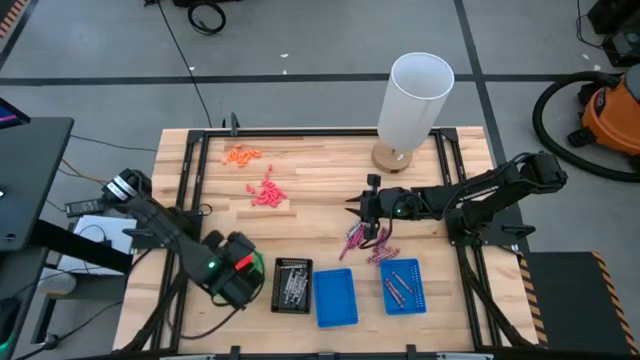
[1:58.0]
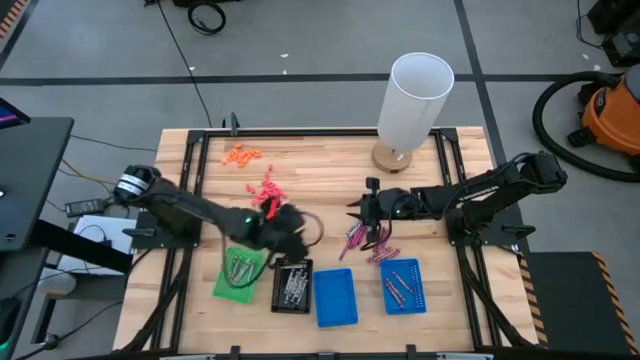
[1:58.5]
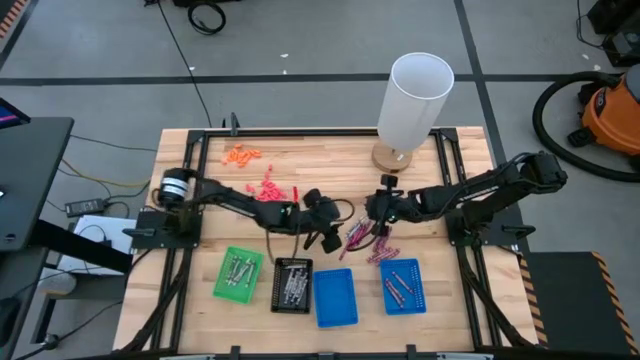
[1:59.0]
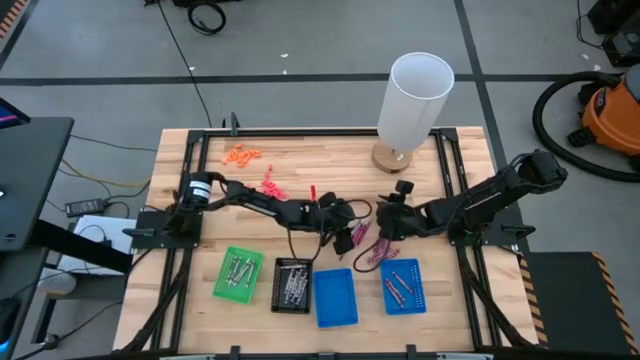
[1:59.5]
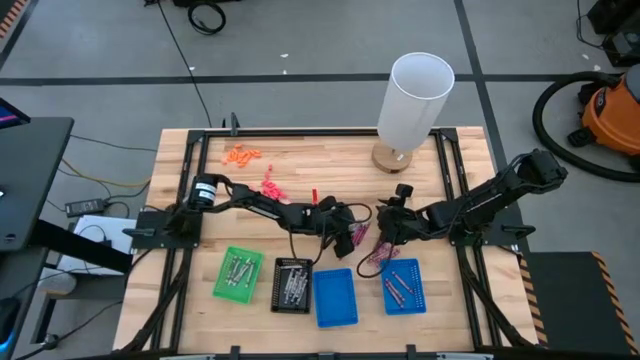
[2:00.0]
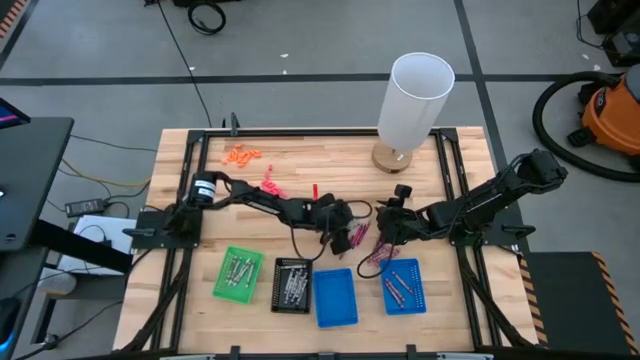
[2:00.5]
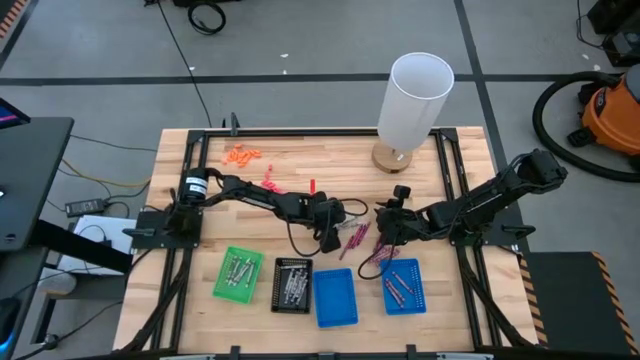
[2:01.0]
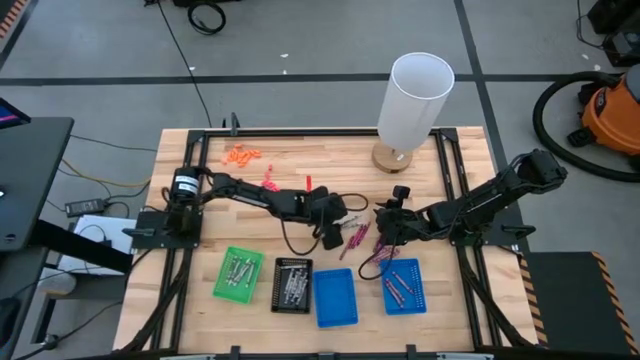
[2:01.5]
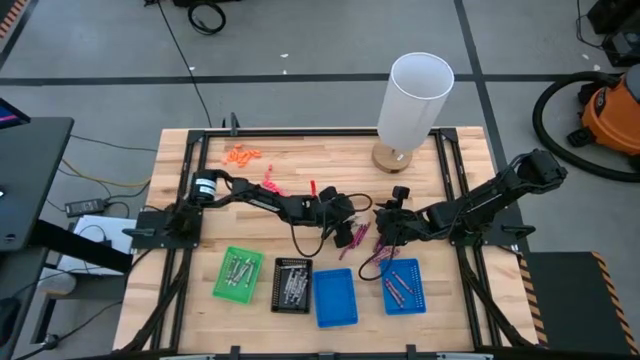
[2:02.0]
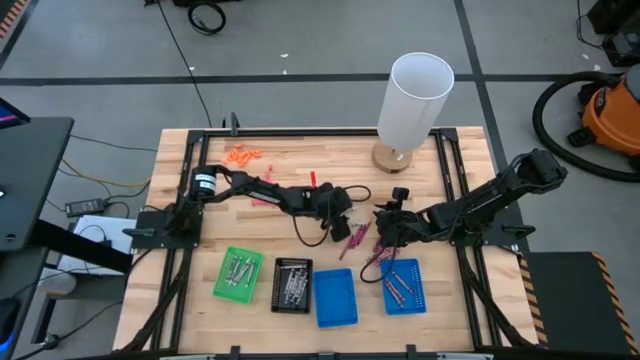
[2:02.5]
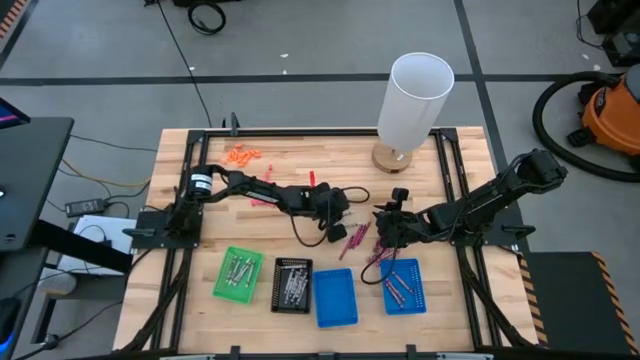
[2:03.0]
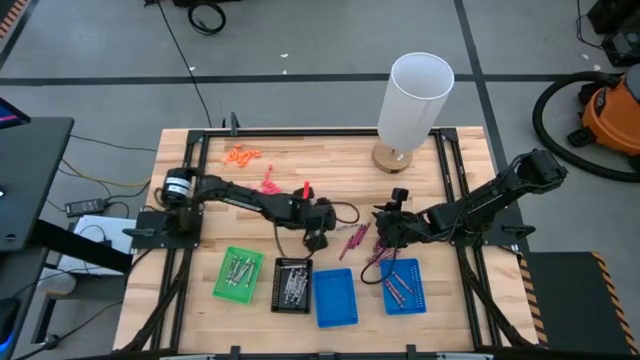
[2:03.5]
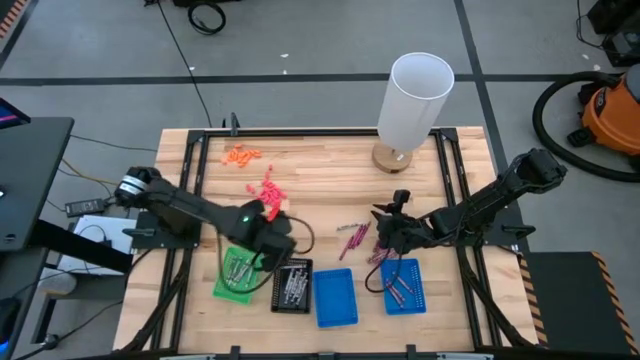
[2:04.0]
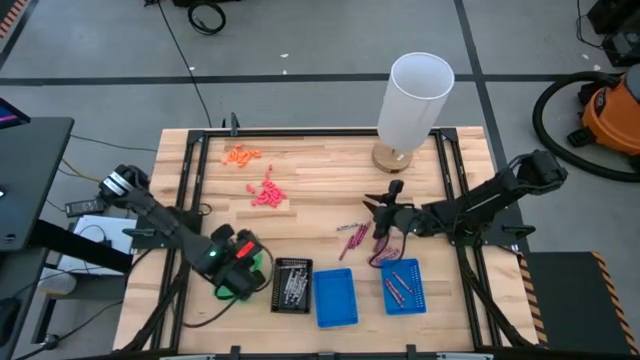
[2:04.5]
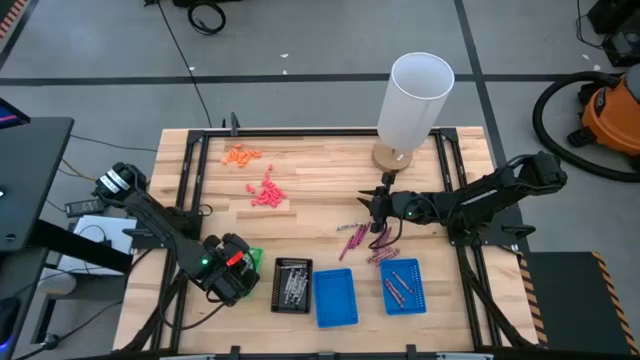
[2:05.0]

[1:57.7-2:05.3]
Task: Sort crayons
Put the white crayon into the green bin

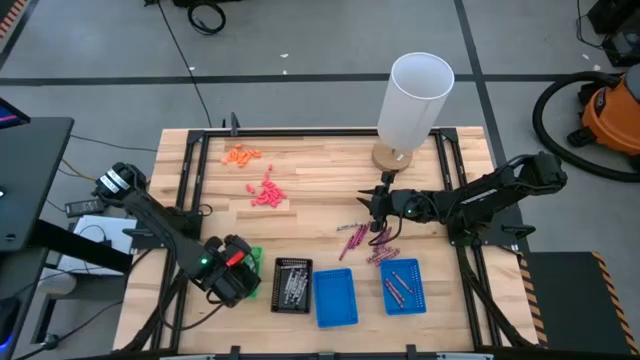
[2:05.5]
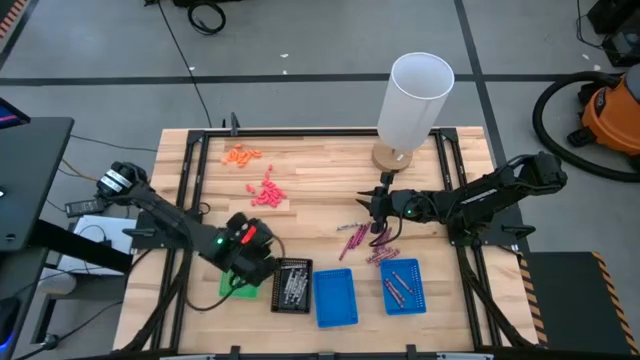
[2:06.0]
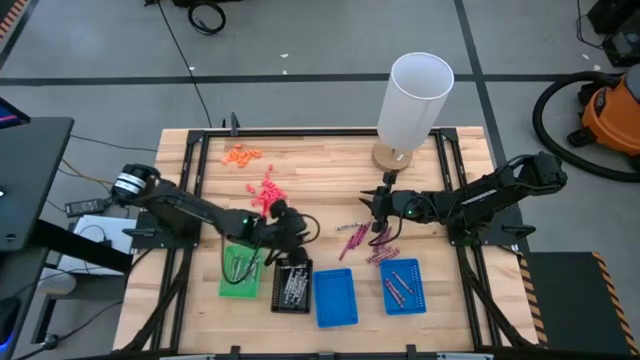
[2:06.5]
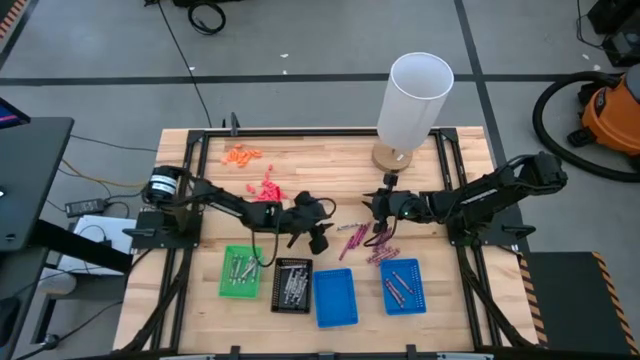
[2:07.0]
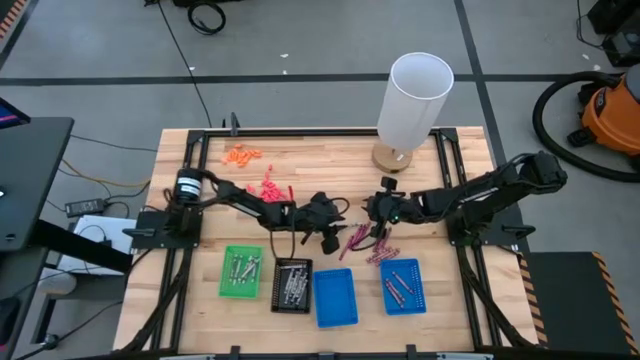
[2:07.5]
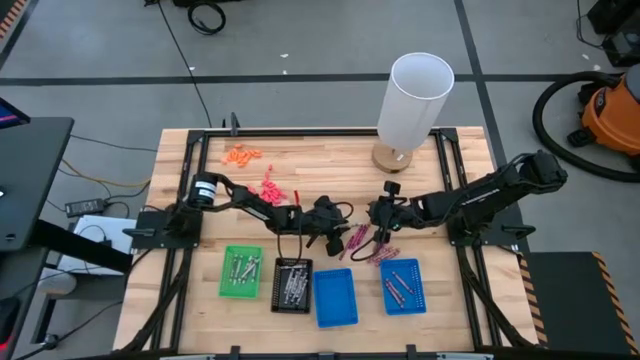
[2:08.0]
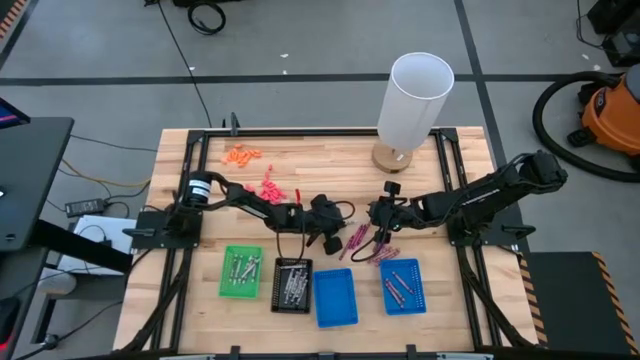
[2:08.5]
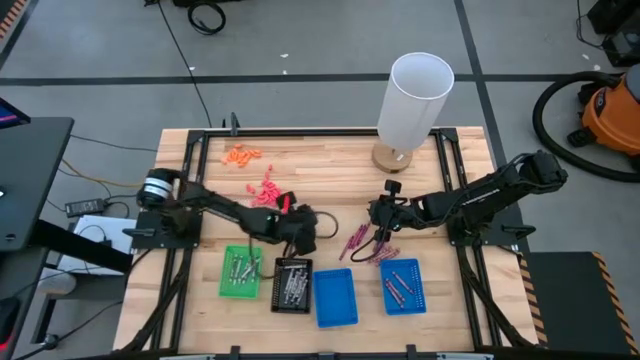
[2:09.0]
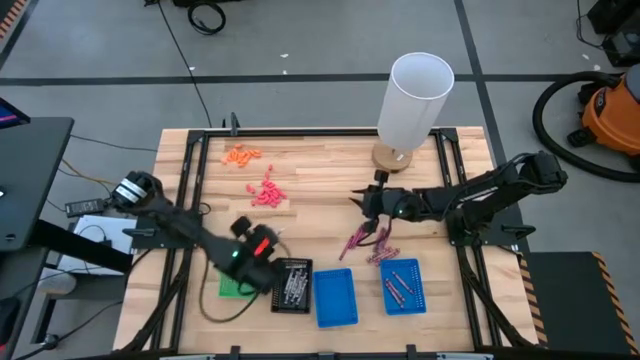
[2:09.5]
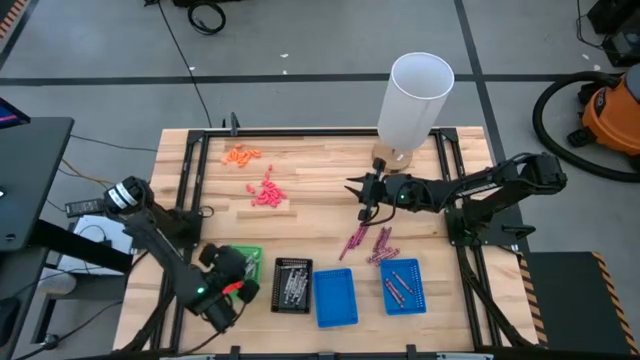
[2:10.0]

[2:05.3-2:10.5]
Put the white crayon into the green bin

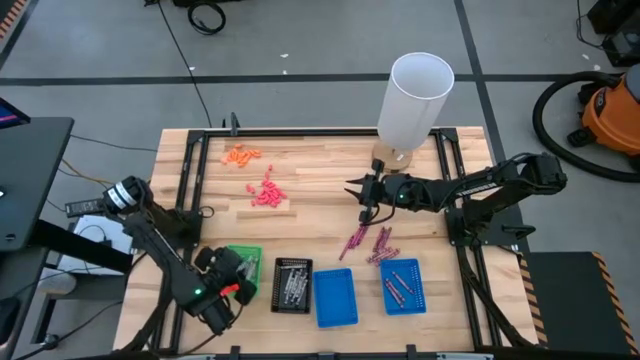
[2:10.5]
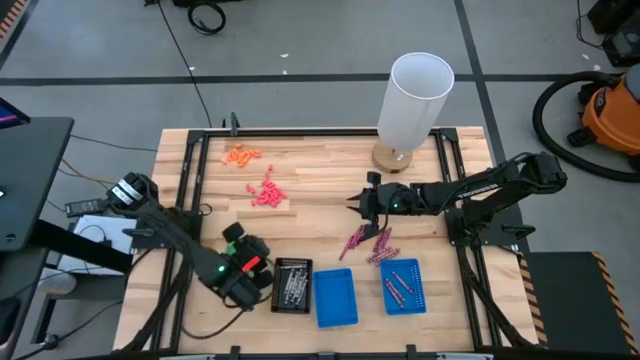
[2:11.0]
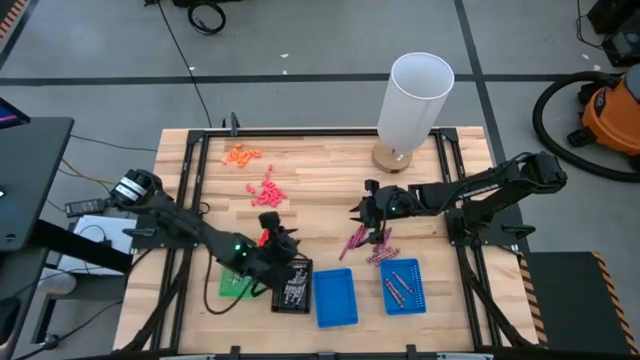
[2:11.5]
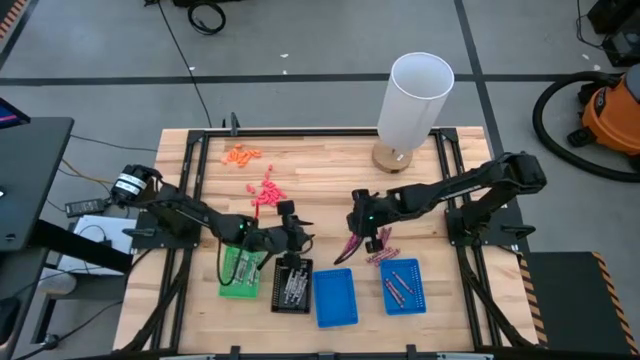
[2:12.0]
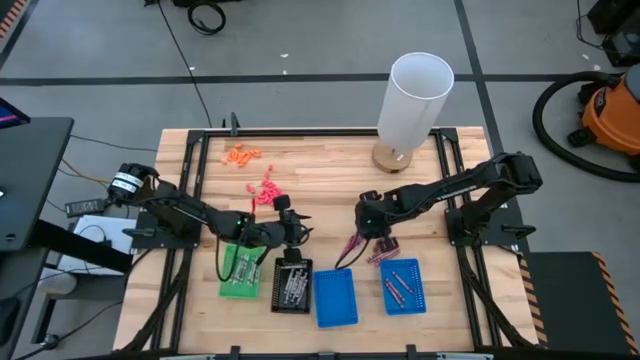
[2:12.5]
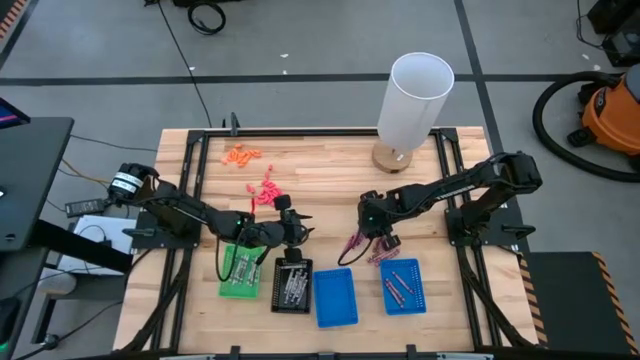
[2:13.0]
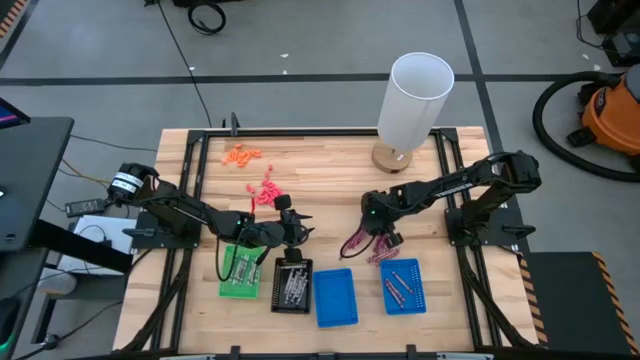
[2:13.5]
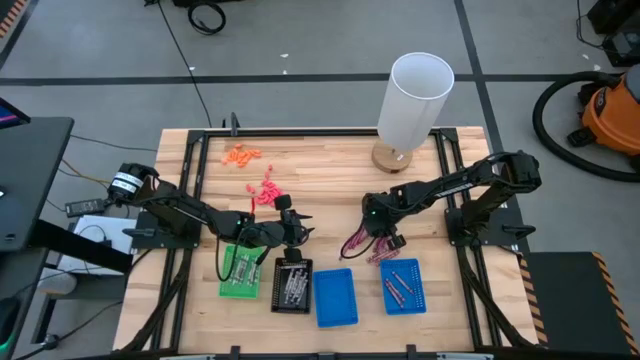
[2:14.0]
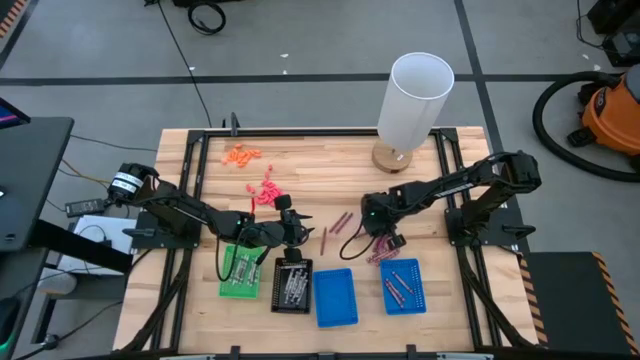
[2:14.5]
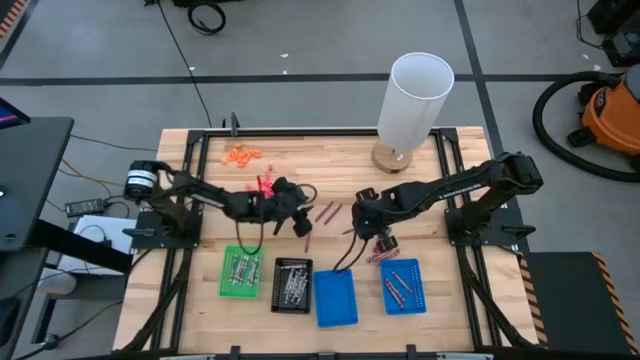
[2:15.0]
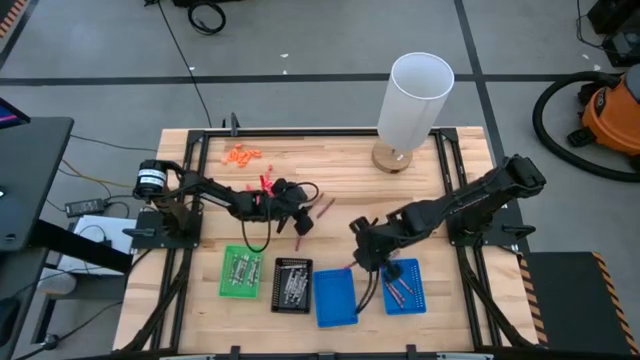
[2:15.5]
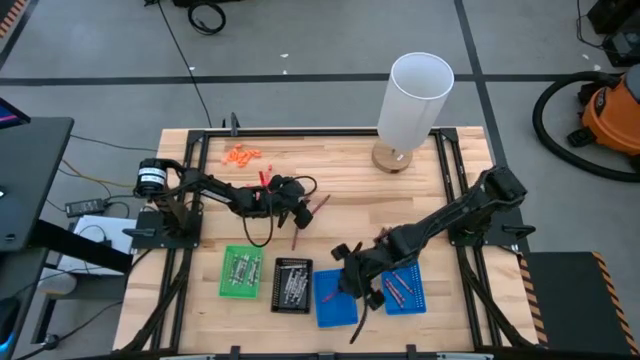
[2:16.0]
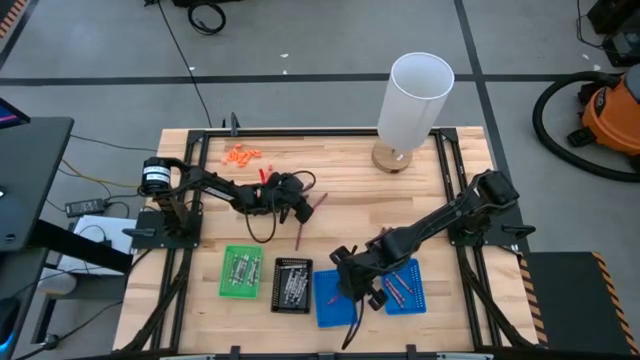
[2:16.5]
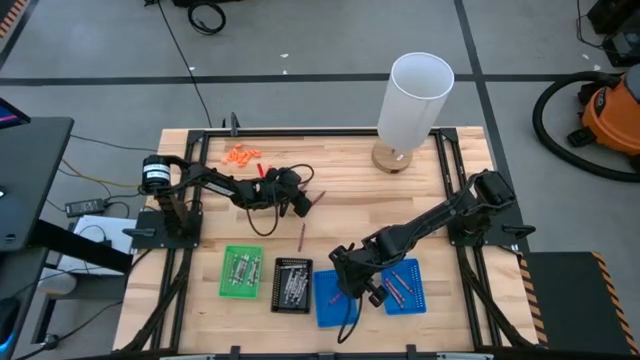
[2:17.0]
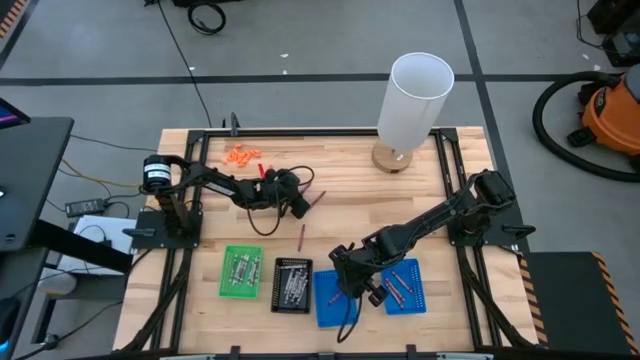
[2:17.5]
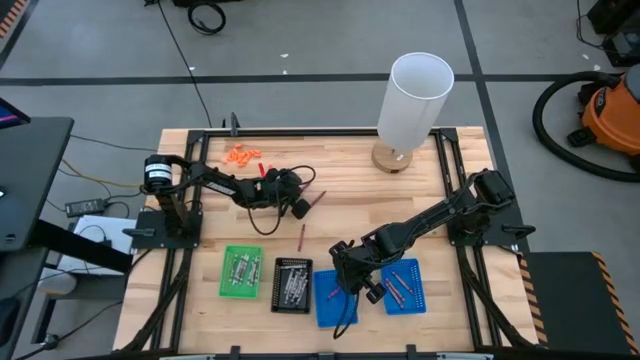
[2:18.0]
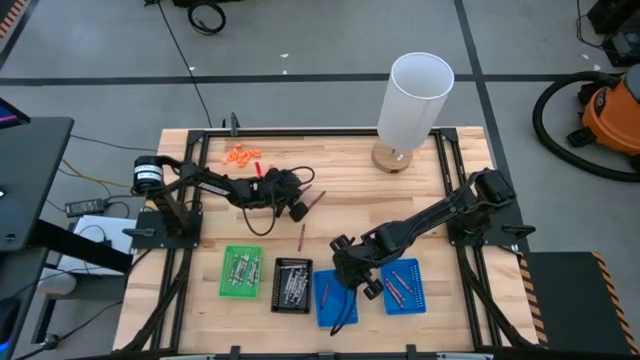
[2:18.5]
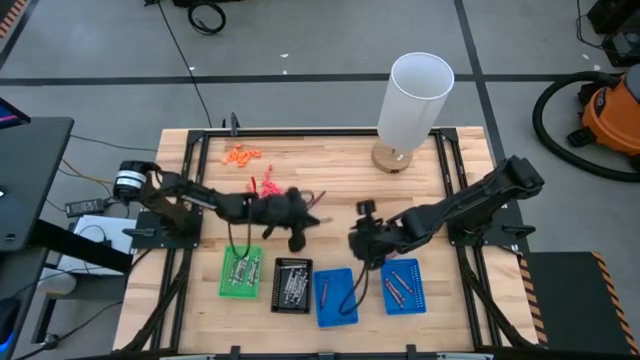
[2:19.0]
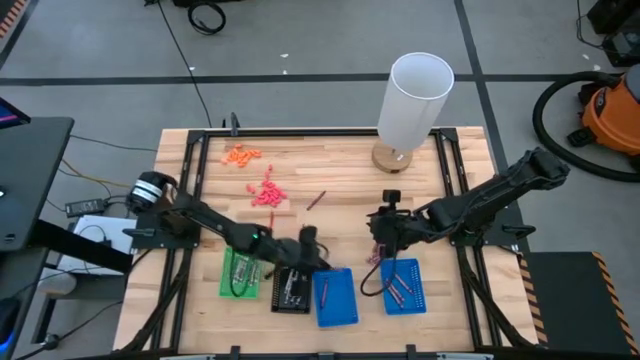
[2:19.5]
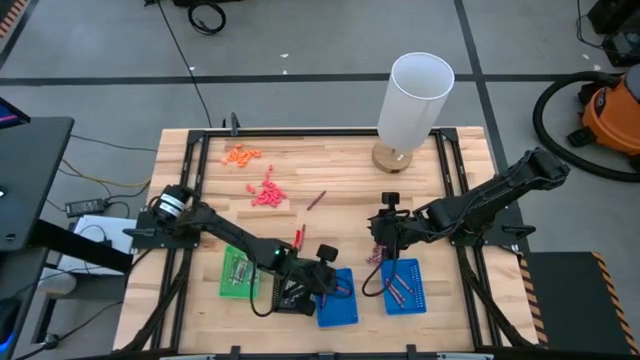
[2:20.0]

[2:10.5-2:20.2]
Put the red crayon into the left blue bin
